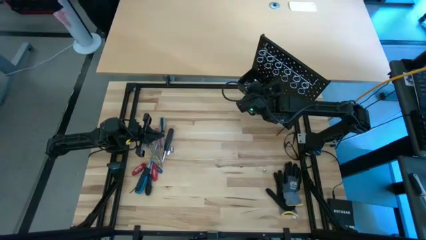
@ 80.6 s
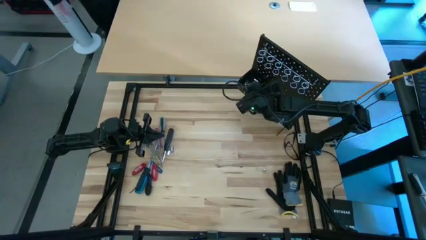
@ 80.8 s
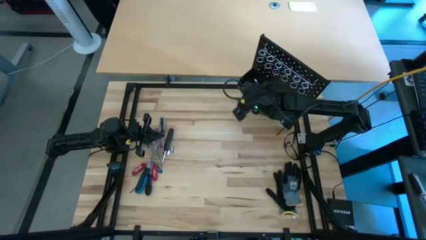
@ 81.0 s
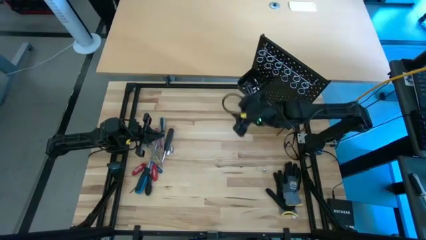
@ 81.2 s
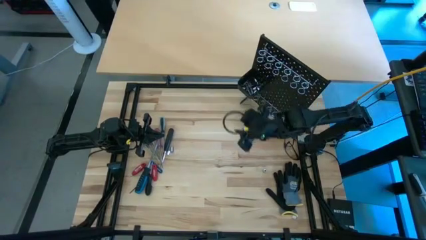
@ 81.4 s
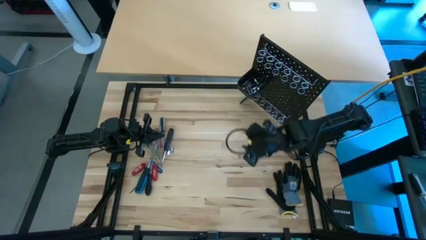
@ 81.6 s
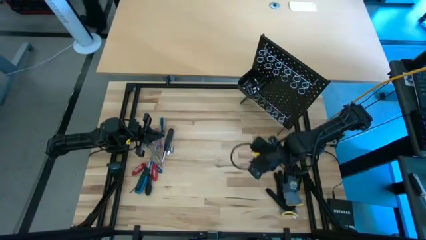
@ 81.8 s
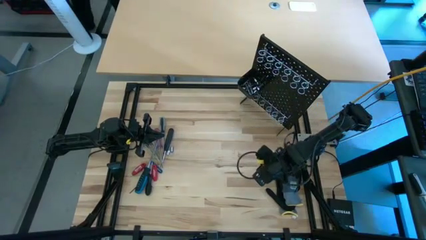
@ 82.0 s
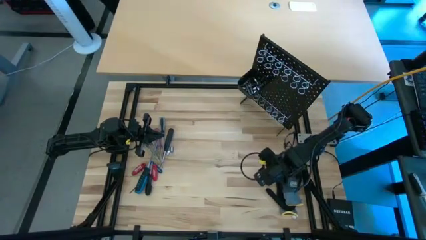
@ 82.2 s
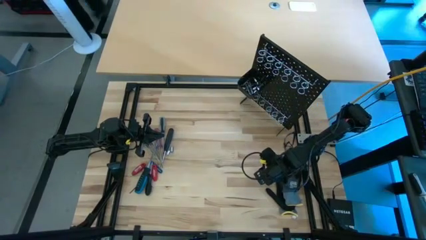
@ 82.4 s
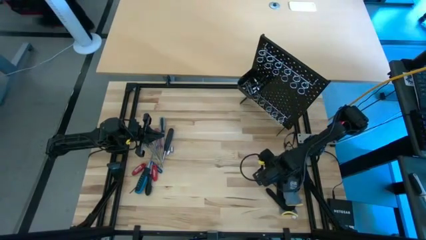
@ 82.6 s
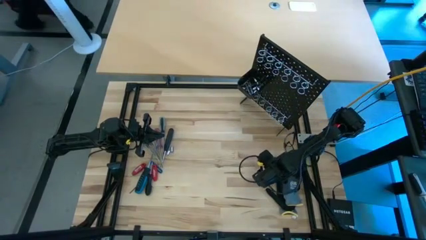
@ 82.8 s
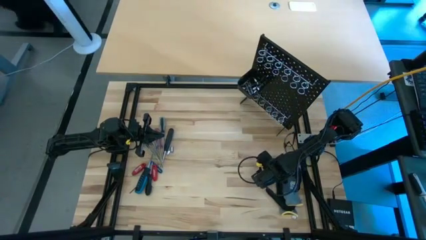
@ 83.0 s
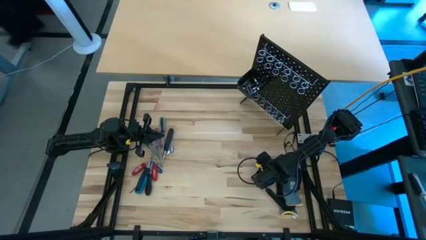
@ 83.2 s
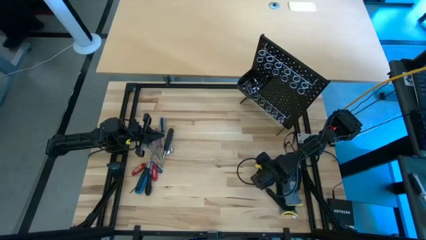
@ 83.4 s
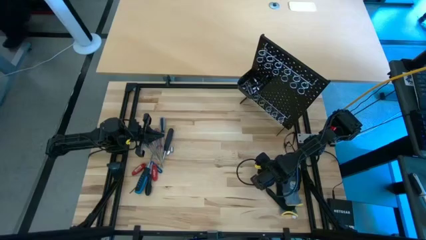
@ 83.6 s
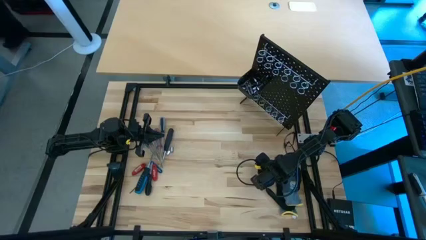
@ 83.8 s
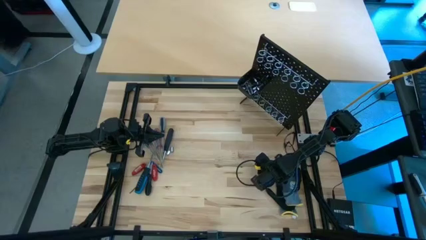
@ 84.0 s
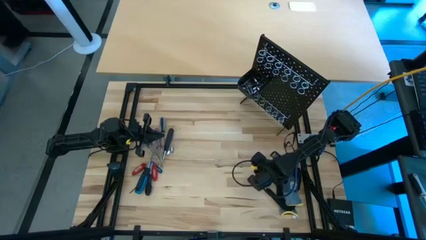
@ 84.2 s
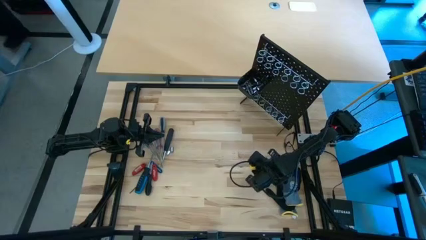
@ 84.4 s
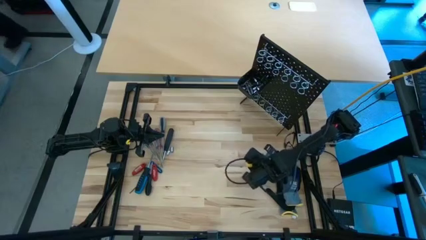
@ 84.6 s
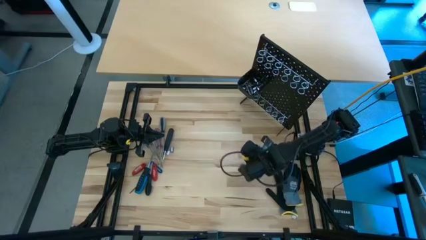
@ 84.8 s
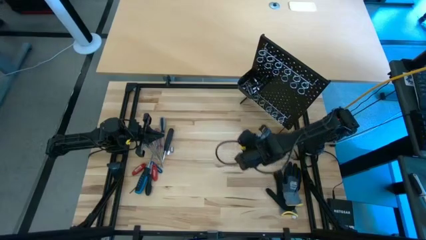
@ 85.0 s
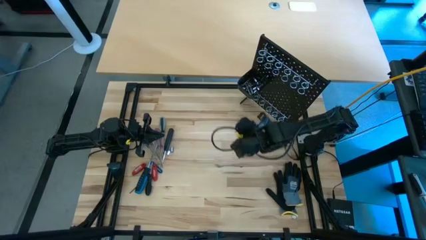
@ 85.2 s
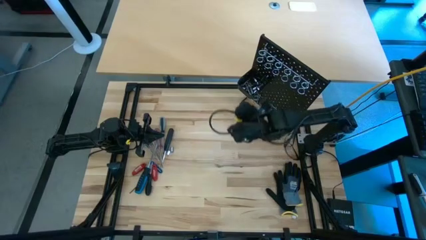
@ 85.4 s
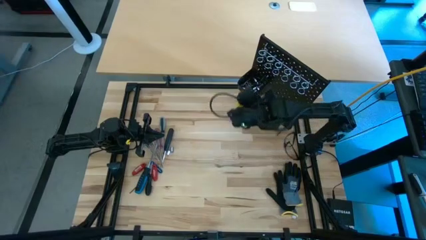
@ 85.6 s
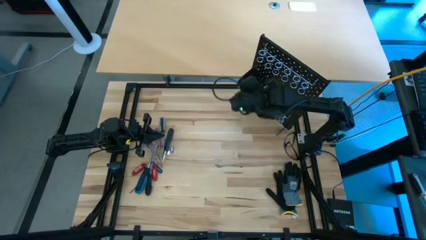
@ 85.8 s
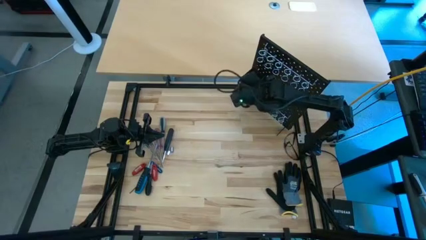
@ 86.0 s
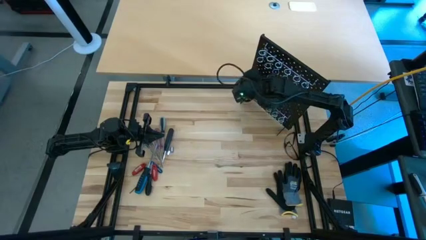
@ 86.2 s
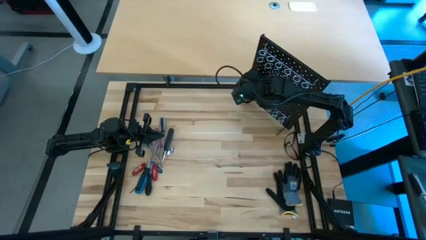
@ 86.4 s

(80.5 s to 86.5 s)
Task: Hang tools onto peg board
Put the socket into the black pegboard bin

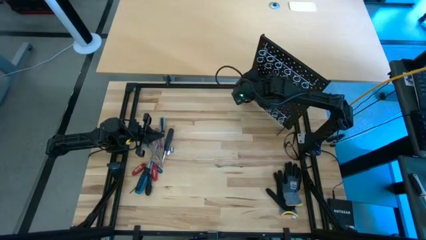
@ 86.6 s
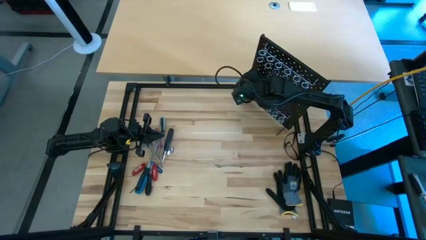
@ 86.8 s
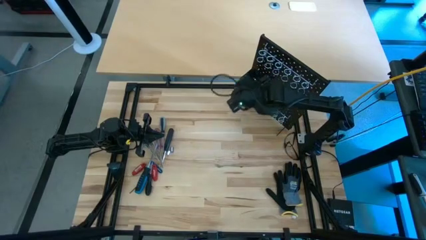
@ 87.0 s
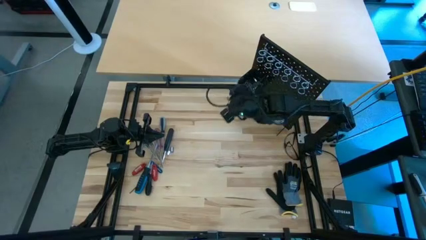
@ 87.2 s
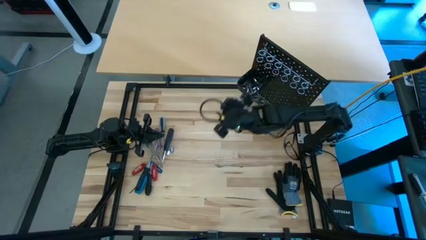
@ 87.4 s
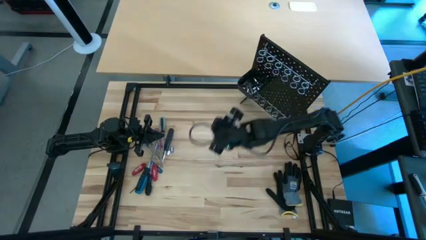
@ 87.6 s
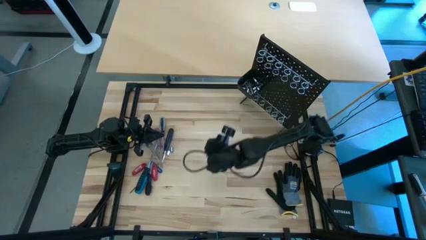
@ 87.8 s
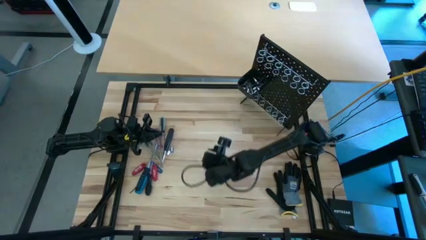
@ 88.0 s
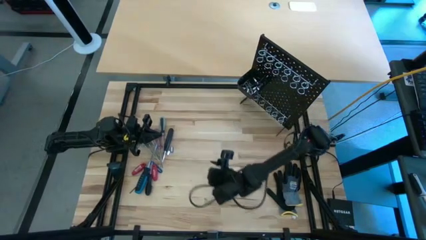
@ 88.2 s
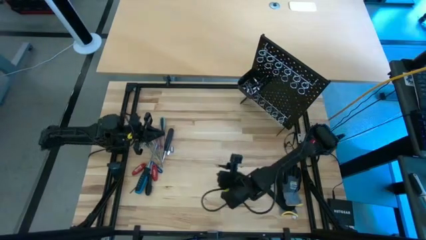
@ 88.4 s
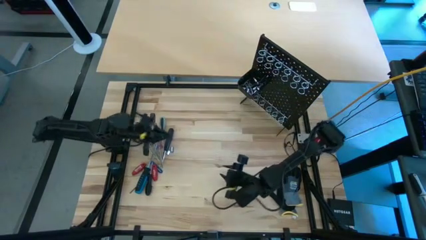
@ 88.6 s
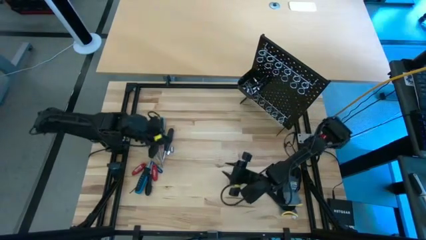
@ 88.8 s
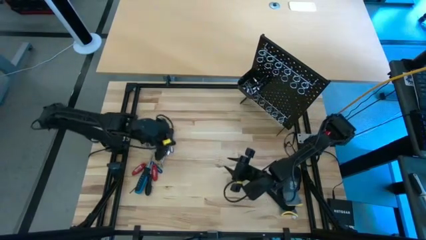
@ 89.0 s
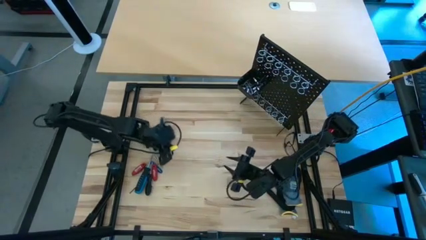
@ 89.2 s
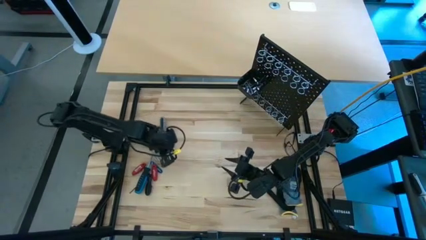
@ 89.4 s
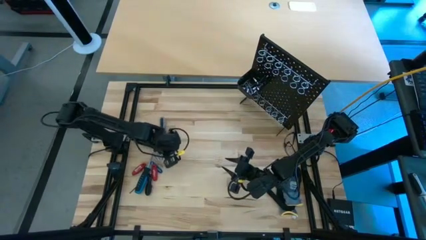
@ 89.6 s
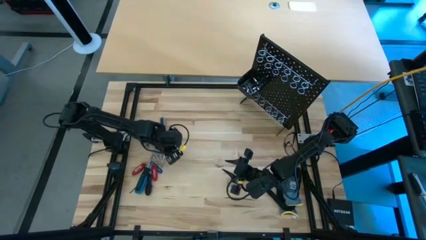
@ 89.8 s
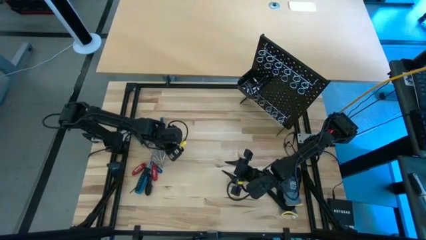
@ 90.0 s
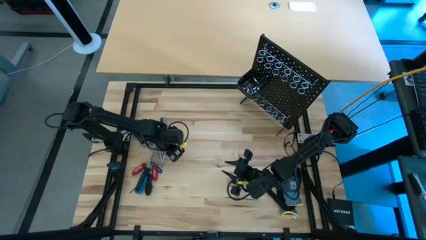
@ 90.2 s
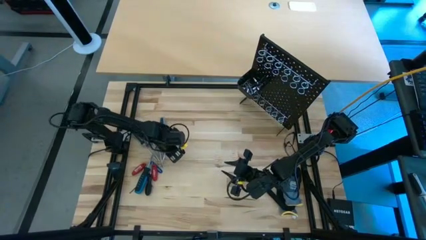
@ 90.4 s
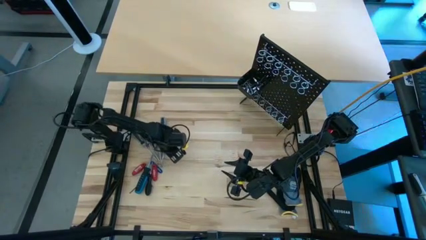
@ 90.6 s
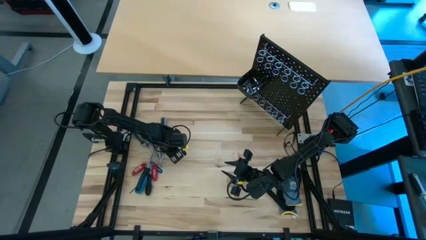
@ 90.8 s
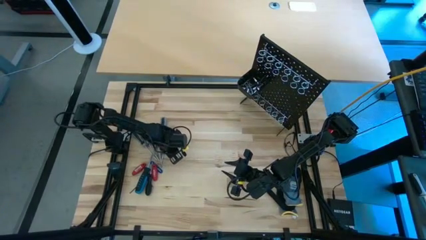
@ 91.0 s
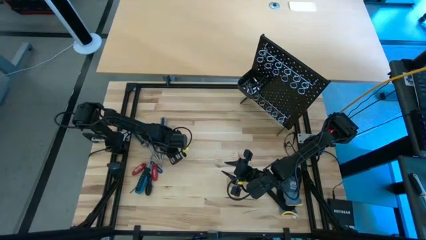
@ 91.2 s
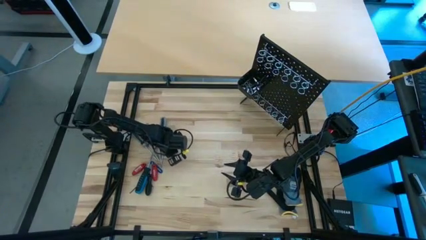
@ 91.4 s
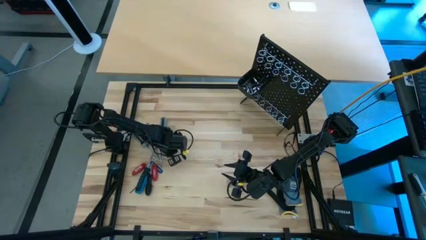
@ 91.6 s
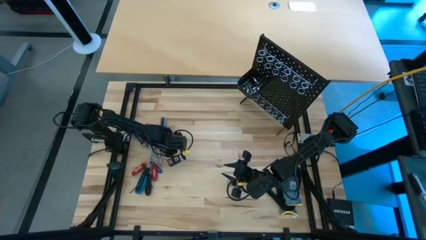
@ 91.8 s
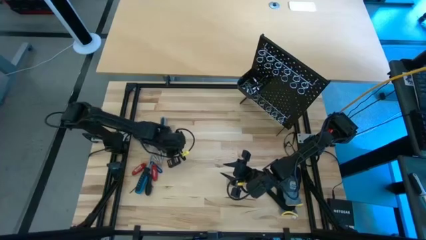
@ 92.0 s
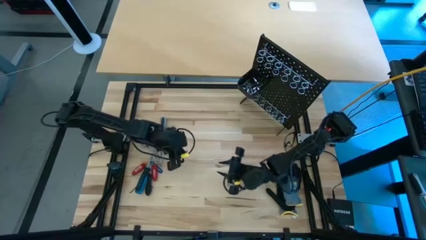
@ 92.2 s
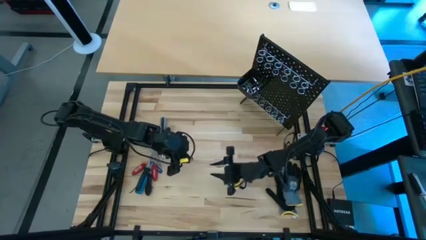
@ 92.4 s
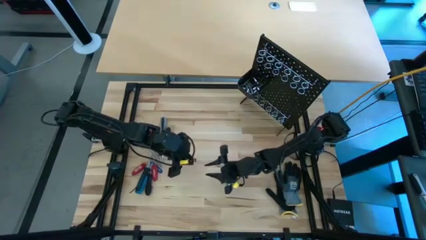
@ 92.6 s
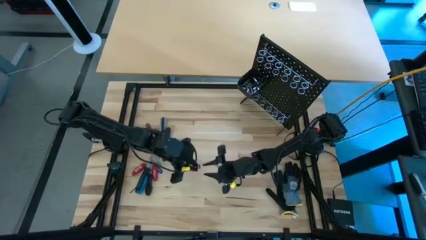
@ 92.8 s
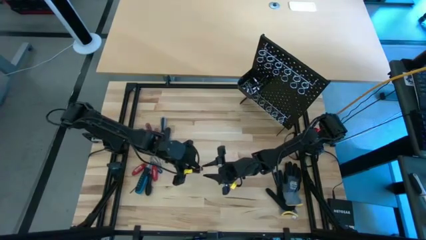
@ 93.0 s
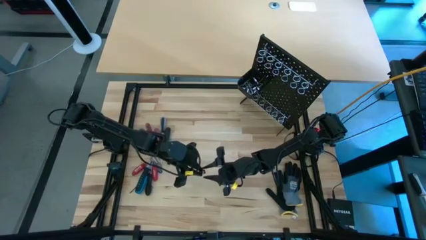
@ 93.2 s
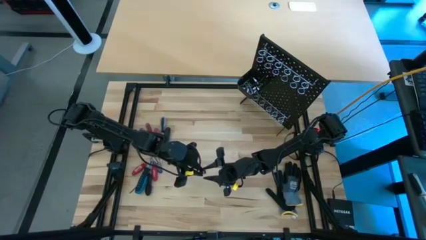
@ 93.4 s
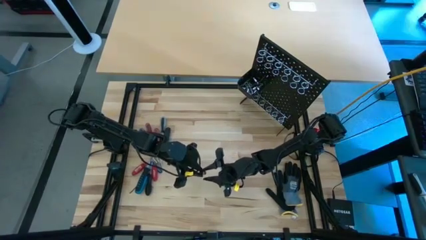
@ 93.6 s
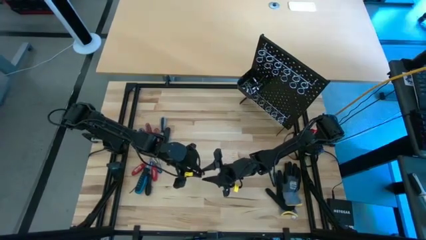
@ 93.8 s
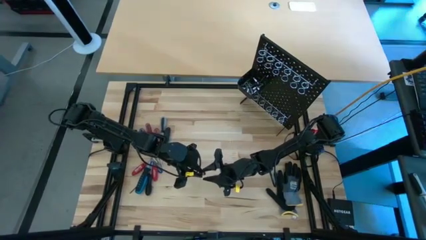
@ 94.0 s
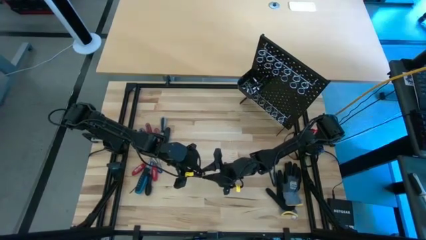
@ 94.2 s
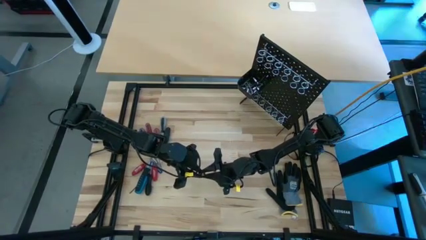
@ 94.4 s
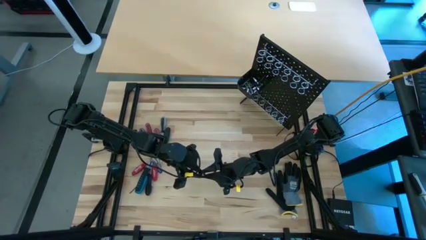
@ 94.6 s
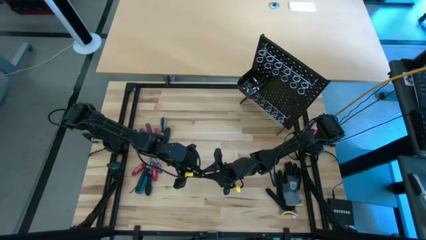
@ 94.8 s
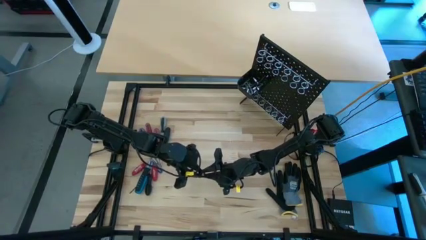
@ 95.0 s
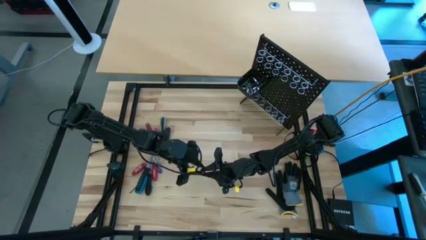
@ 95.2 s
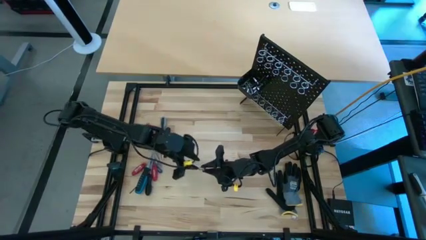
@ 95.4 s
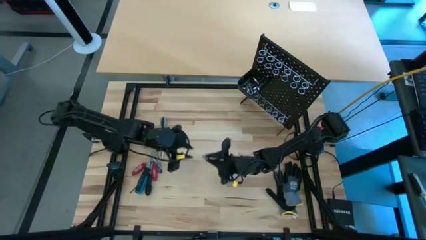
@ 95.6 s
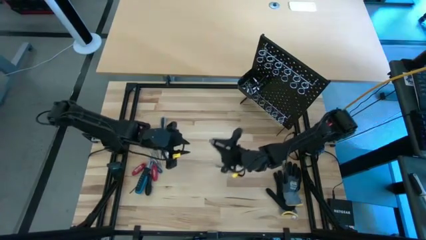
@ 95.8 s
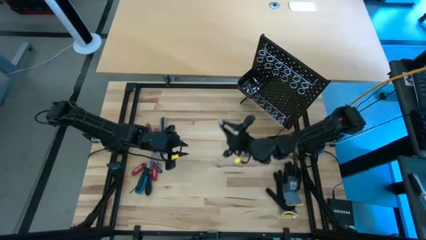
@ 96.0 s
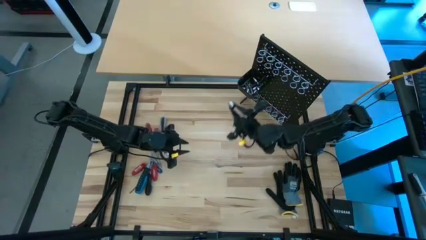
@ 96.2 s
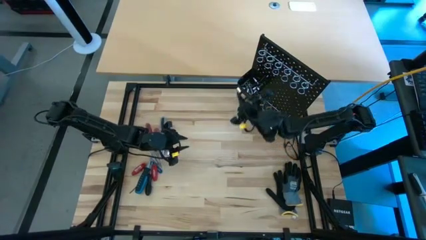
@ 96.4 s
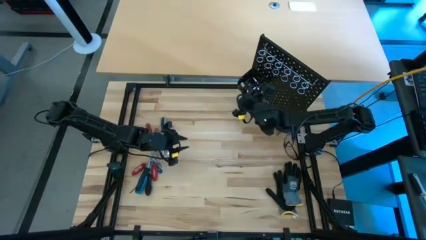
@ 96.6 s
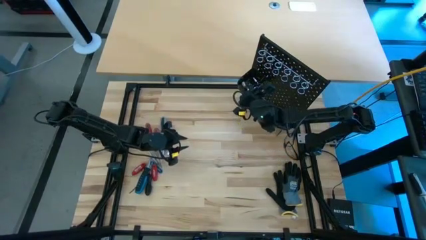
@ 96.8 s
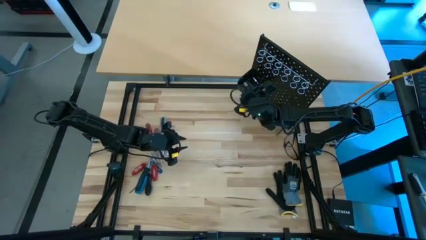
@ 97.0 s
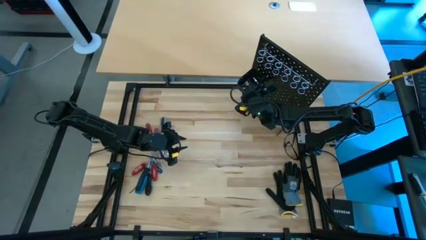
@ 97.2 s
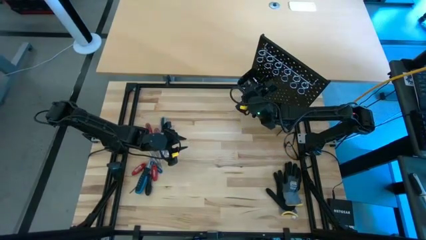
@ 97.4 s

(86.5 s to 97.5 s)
Put the socket into the black pegboard bin
